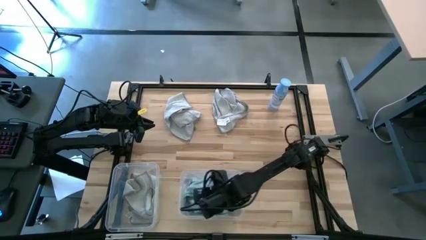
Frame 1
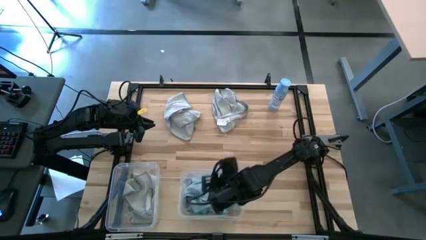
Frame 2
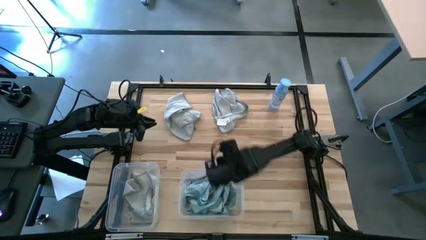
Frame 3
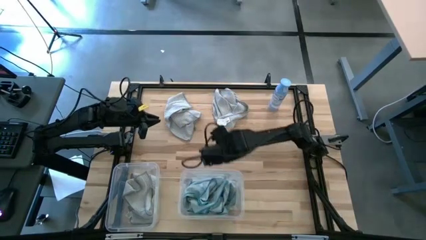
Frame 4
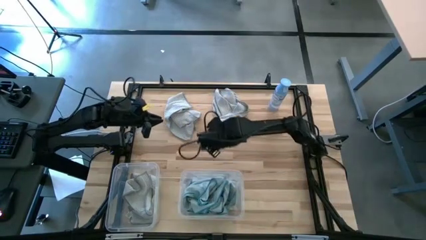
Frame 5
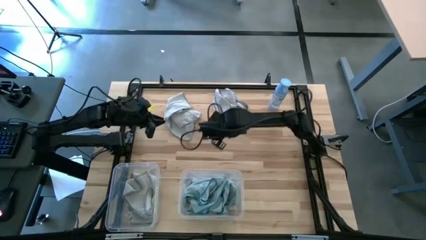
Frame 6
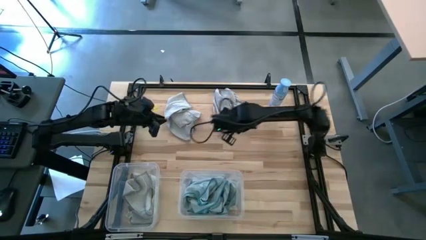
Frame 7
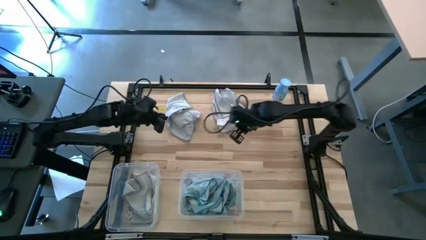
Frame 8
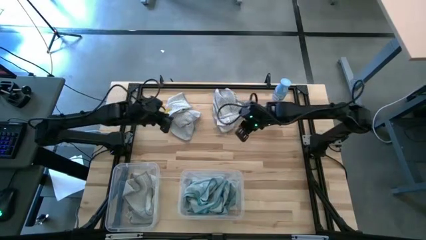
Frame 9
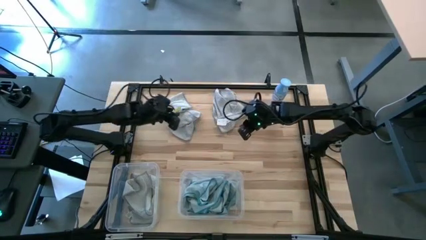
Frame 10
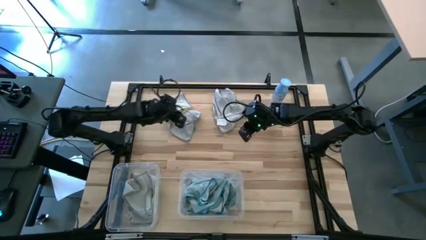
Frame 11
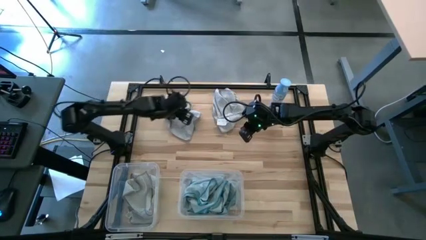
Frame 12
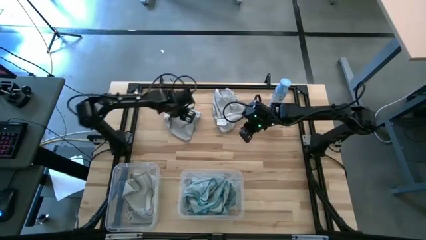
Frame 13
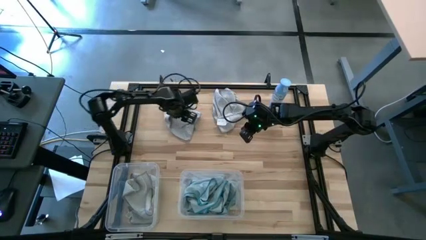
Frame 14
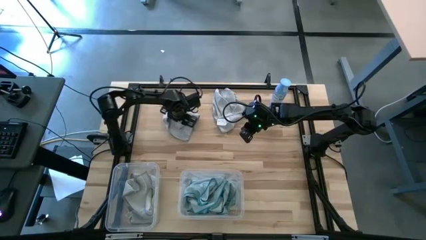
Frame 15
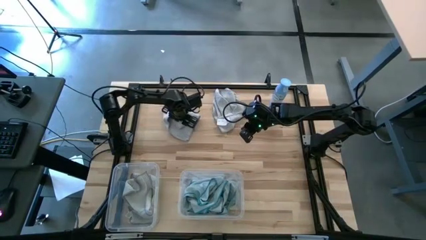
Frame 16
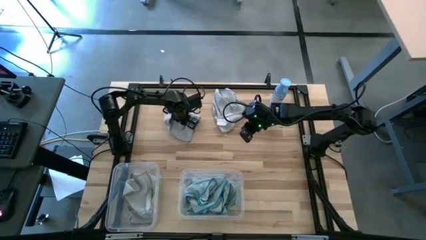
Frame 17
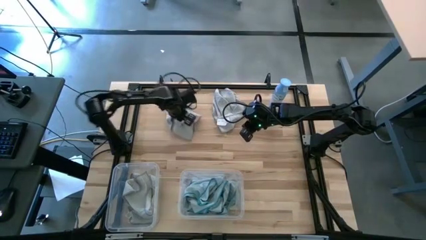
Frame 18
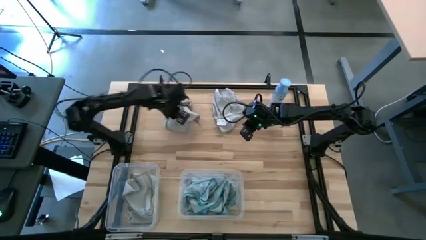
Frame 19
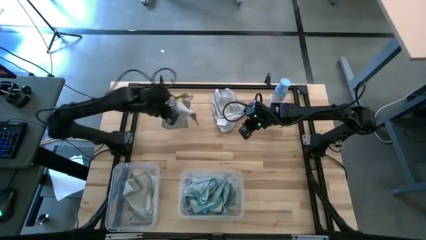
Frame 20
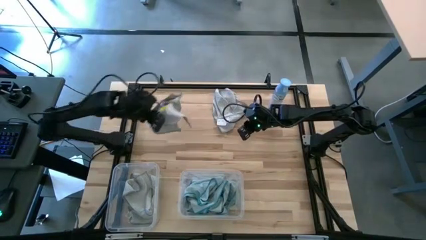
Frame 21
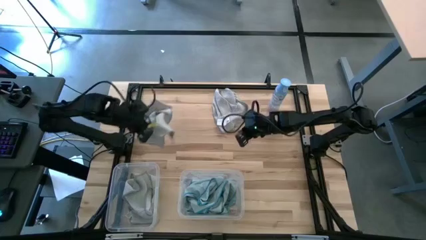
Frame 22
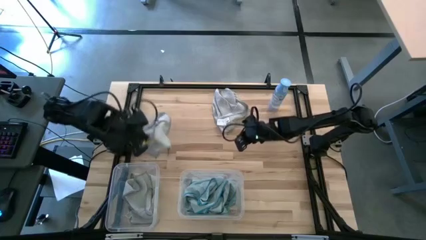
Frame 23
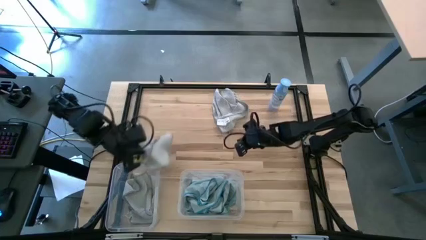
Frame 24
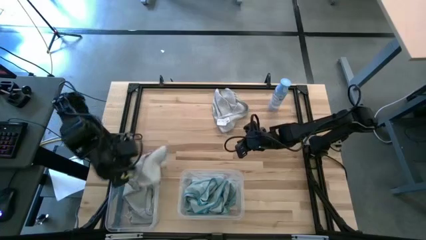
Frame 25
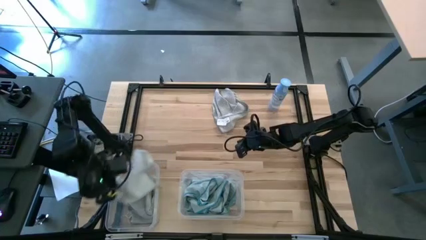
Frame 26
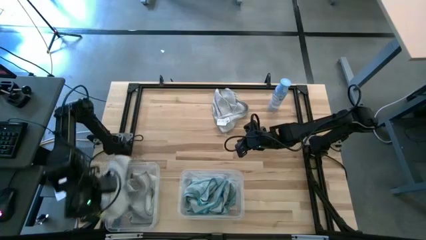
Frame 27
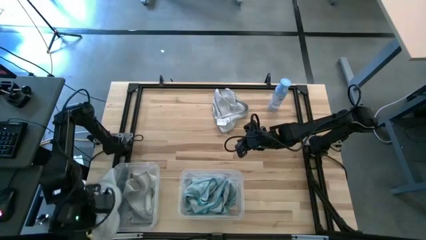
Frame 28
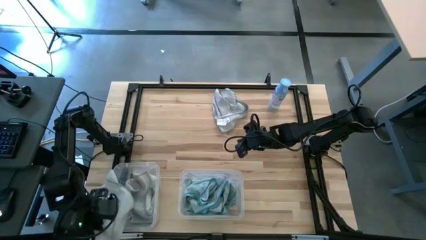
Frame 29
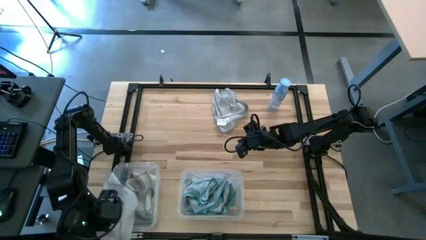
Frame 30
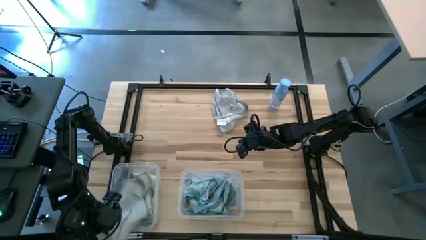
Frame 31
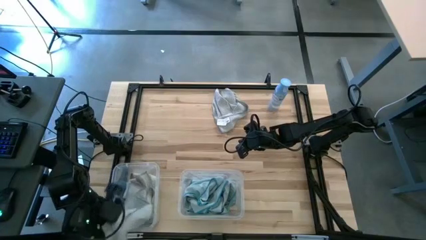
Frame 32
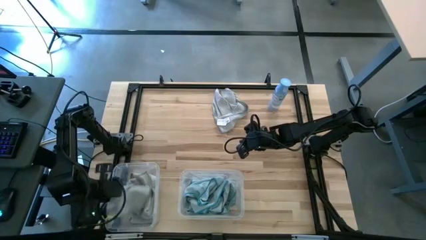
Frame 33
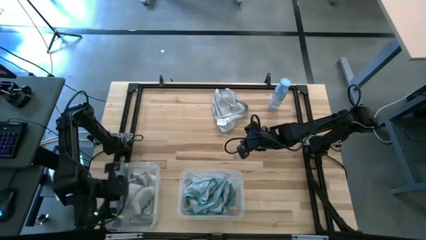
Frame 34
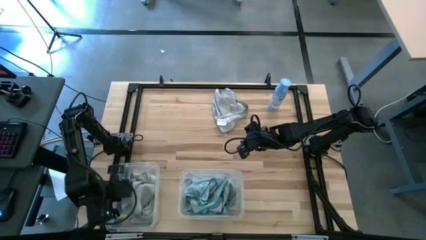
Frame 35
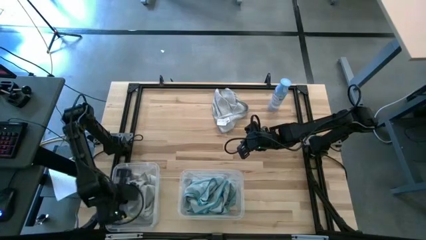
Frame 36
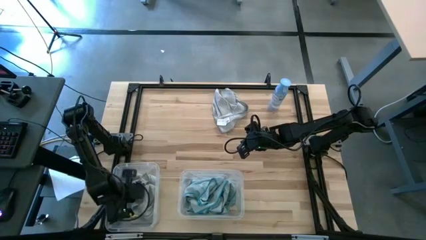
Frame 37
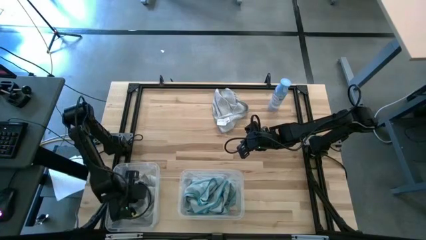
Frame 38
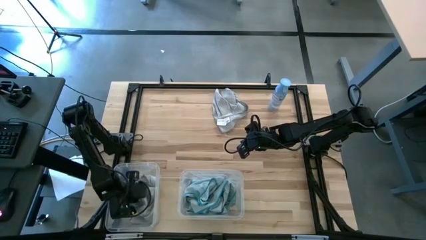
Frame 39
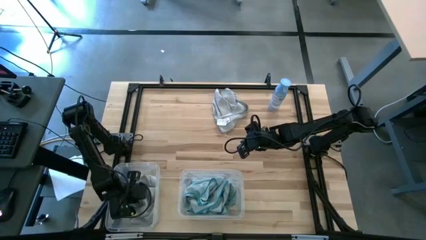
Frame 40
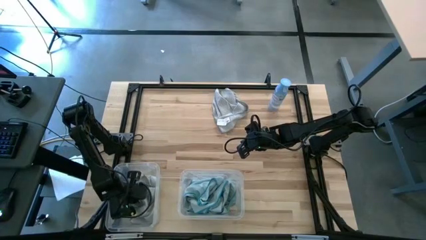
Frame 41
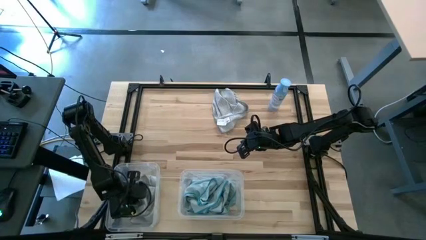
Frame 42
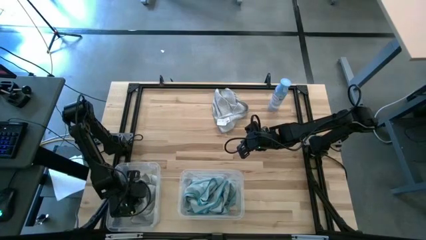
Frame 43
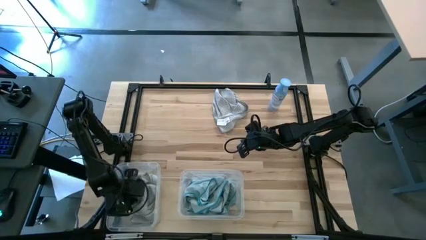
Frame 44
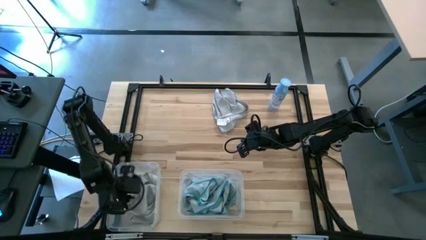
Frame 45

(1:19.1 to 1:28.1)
Task: Sort microfiber towel by color & place in baskets
Put the left grey towel into the left transparent bin

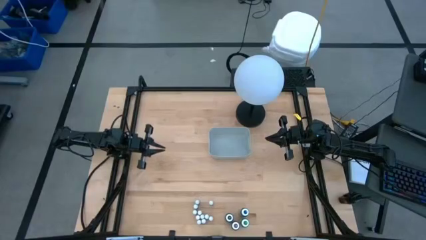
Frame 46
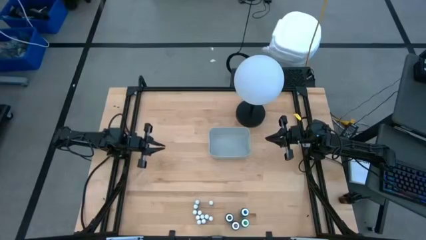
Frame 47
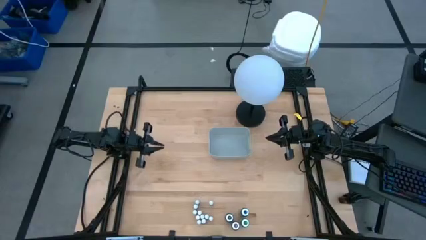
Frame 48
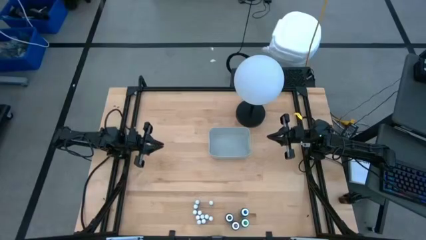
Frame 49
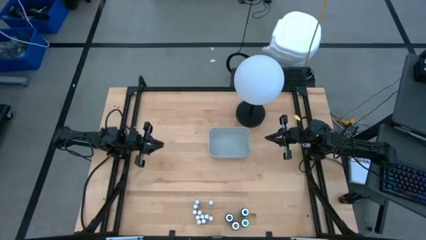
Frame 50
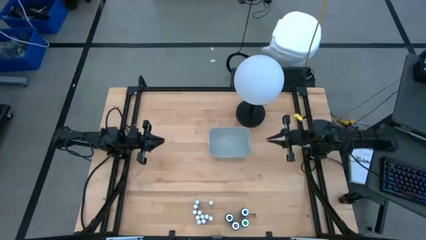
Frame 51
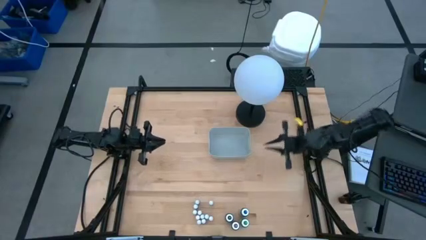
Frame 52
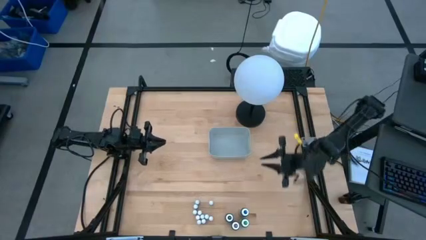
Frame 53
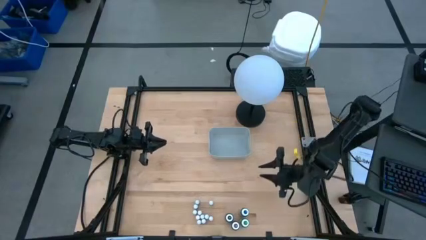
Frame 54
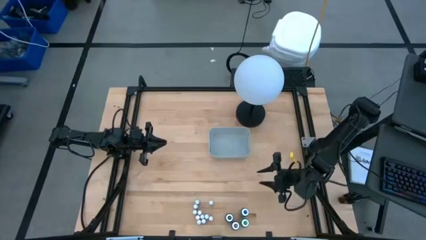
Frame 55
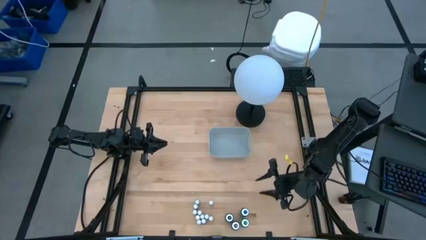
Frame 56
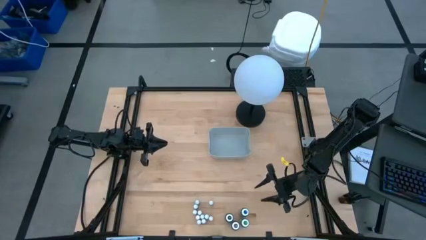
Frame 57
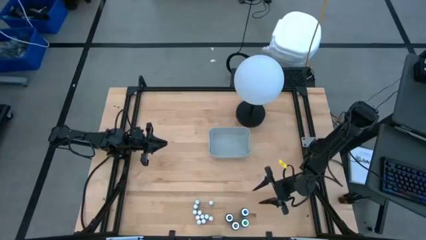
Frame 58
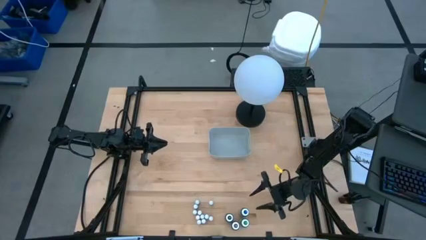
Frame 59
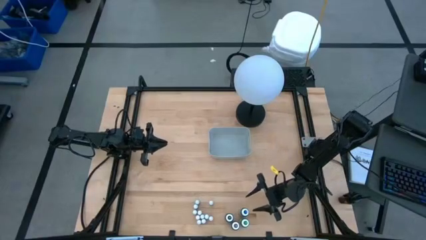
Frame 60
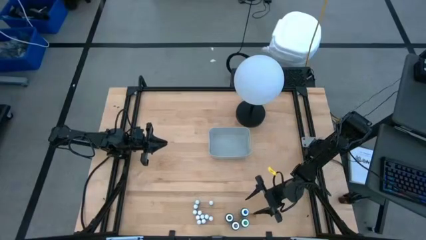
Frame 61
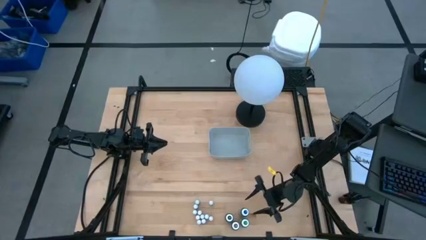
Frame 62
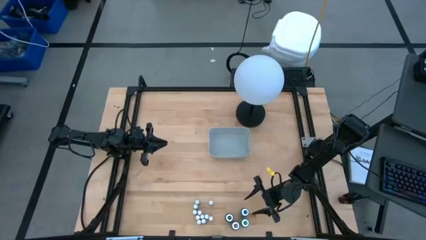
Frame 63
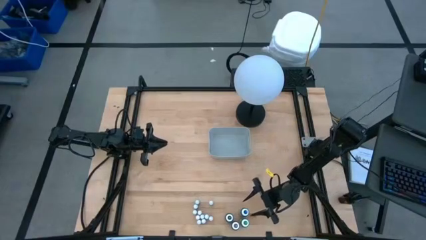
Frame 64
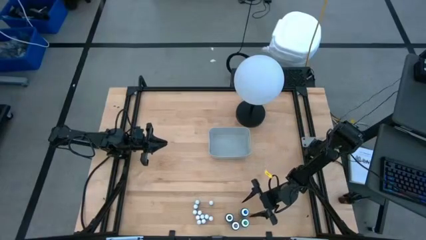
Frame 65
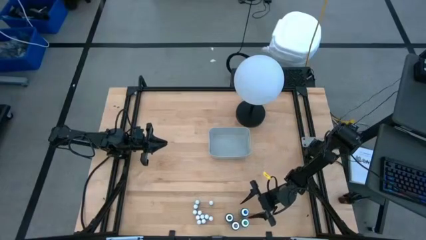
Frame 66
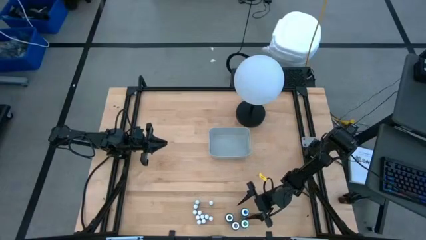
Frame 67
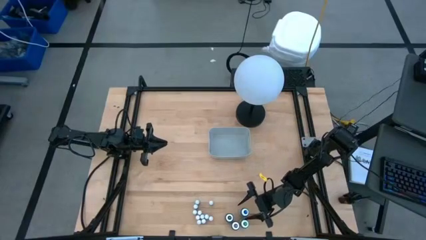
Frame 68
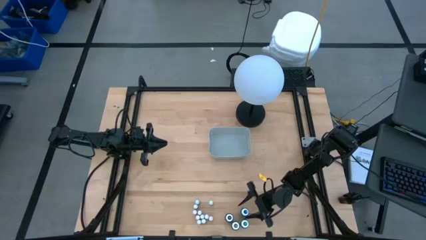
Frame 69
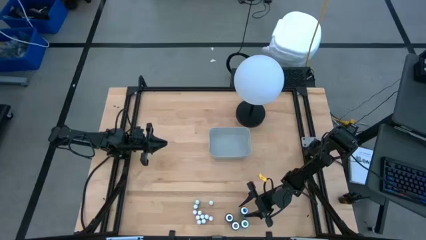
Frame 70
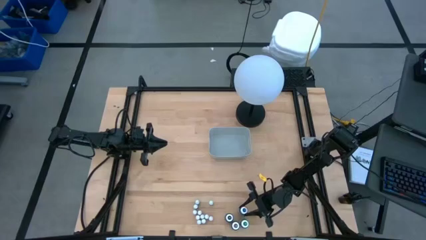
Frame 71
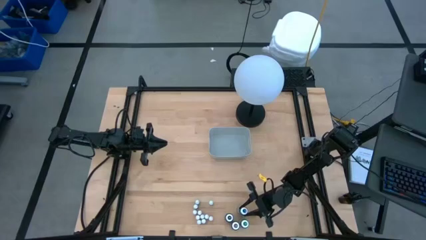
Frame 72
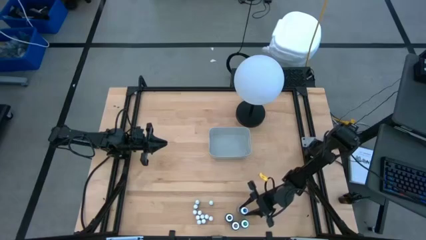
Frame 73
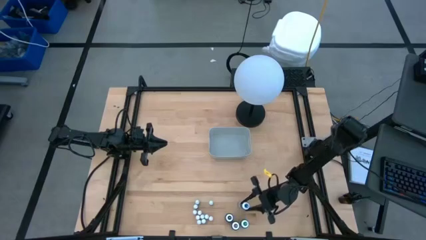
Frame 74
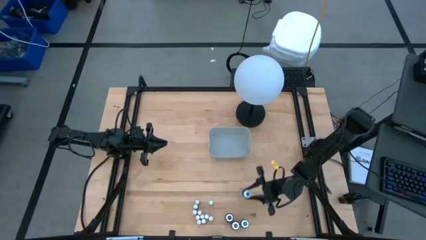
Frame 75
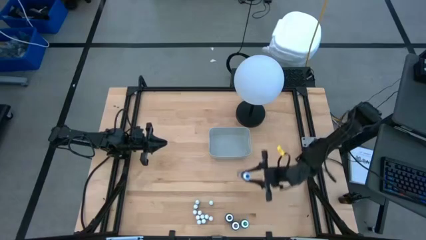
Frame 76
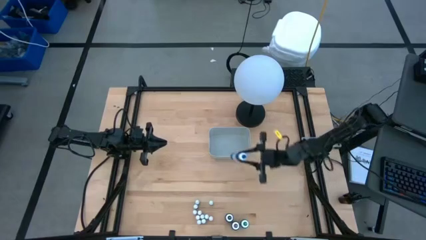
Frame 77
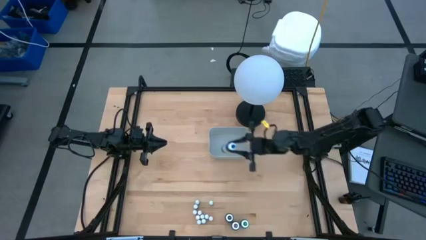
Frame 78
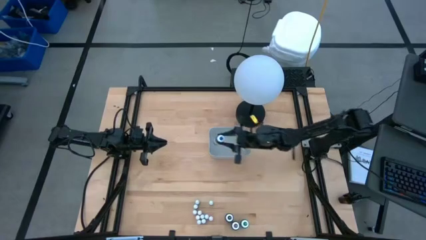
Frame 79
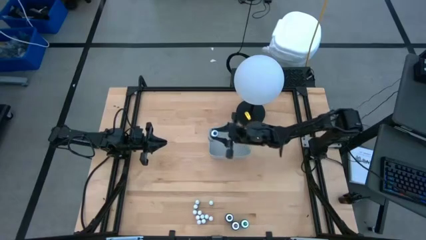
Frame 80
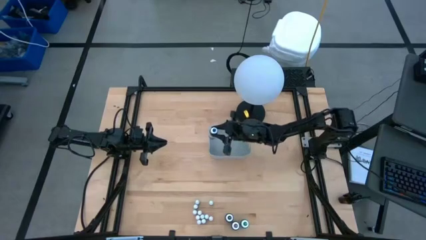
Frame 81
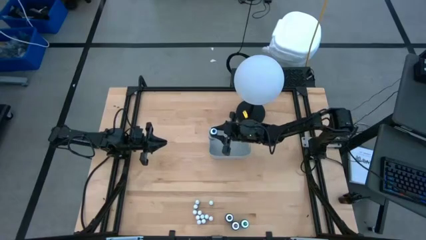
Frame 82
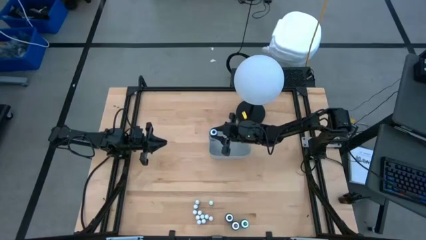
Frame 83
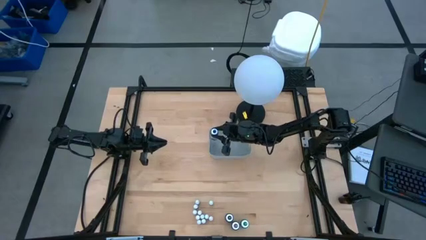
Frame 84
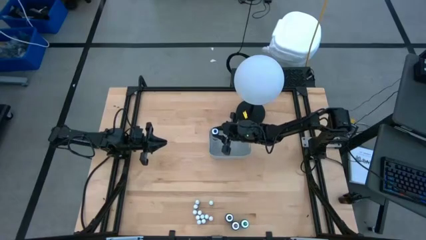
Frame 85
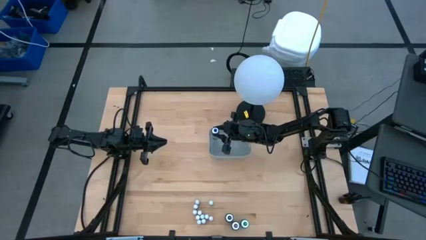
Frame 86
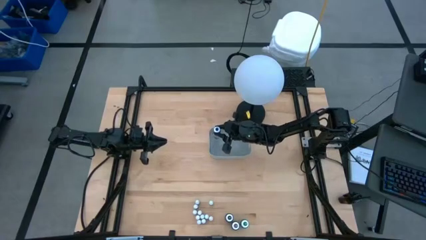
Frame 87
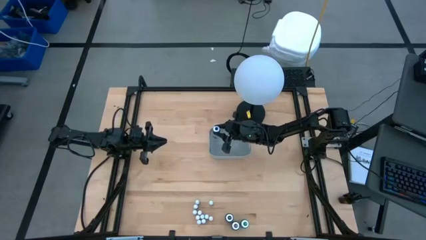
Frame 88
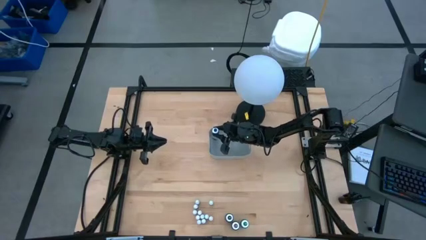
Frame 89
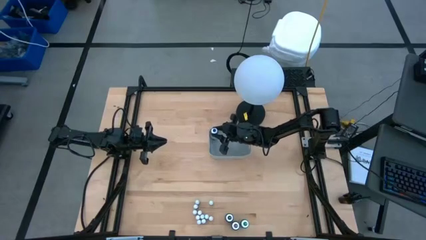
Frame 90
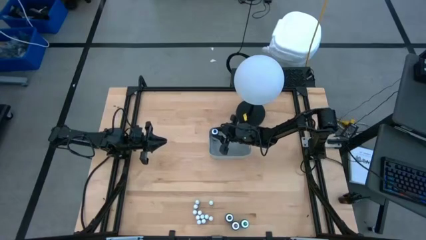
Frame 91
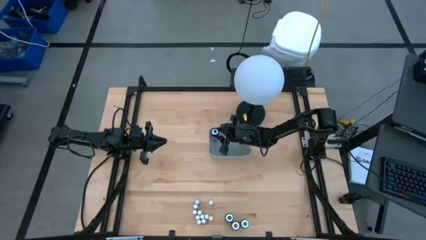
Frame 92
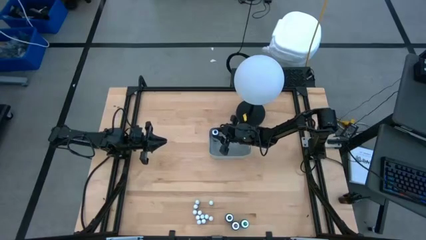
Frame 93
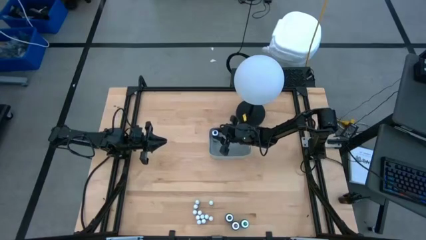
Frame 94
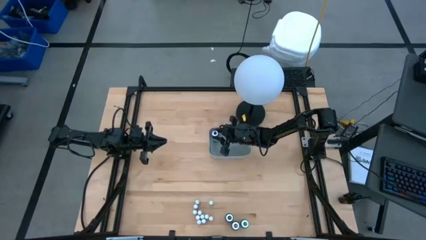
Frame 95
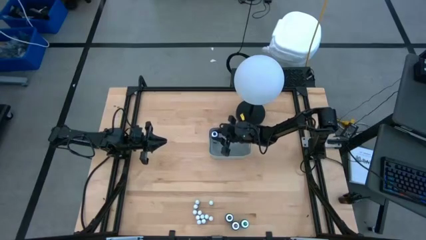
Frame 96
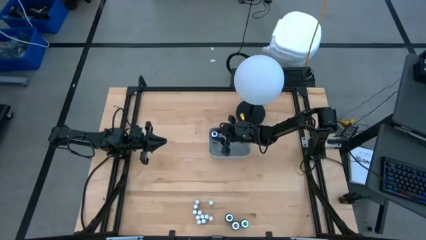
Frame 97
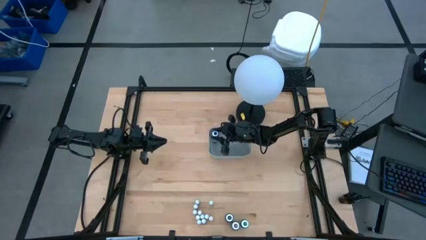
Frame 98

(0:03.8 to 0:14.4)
Task: Pick & Place food coloring
Put the blue food coloring bottle into the gray bin
